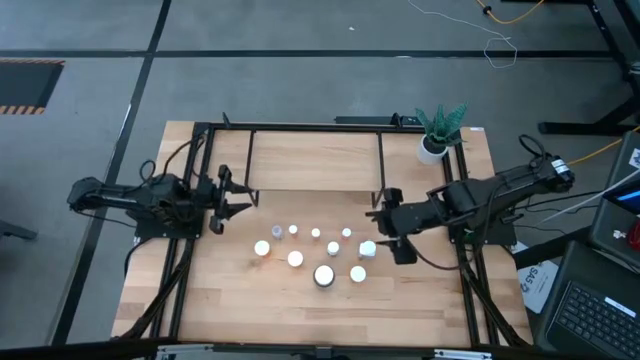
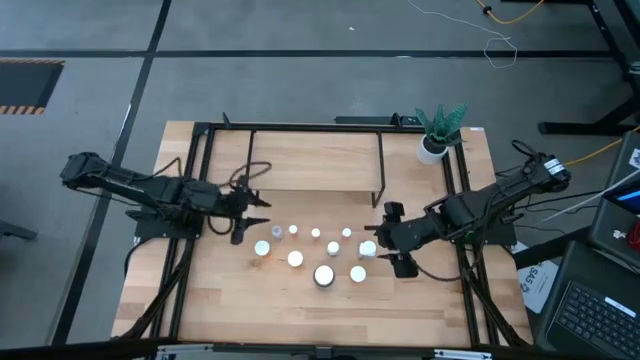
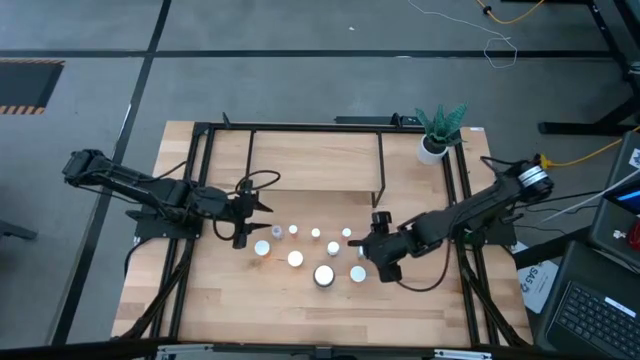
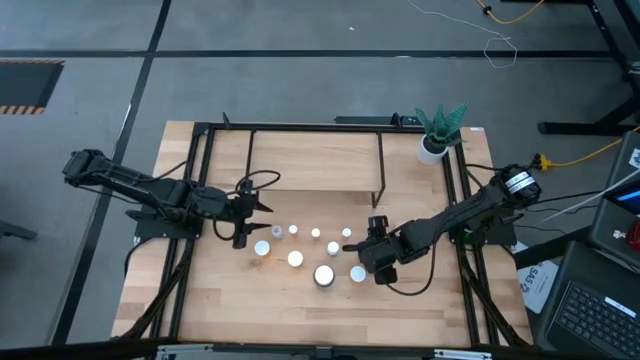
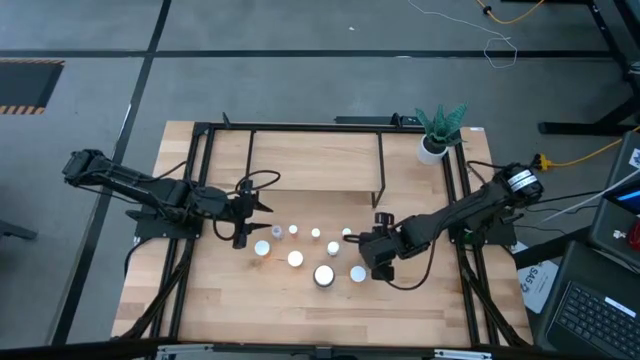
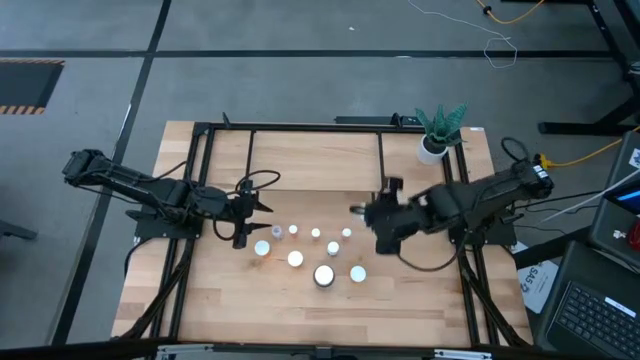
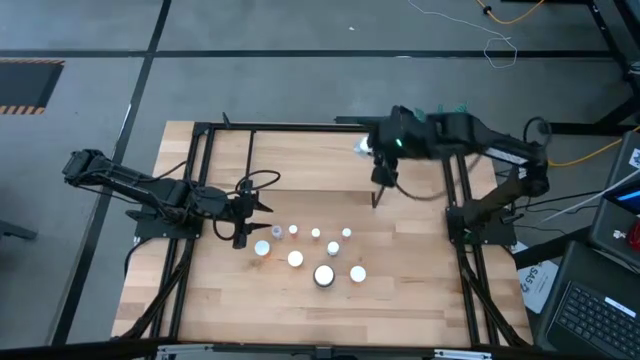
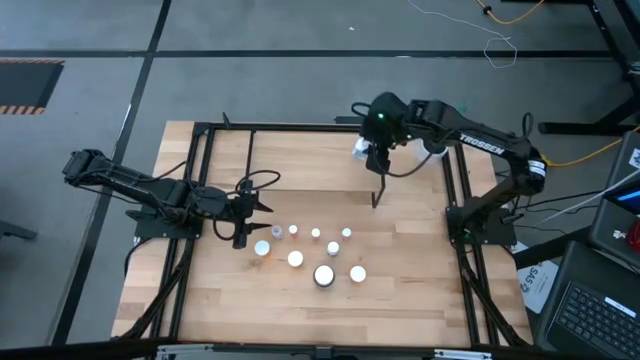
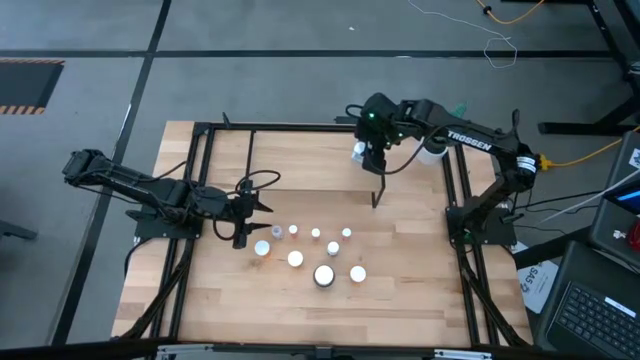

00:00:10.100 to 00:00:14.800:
Task: Pick and place medicine bottles onto shelf by color
Put the large white pill bottle on the shelf

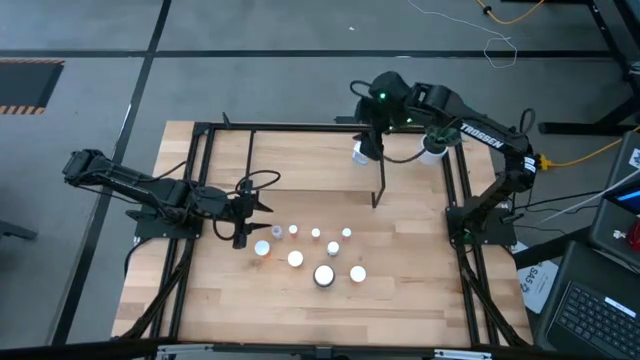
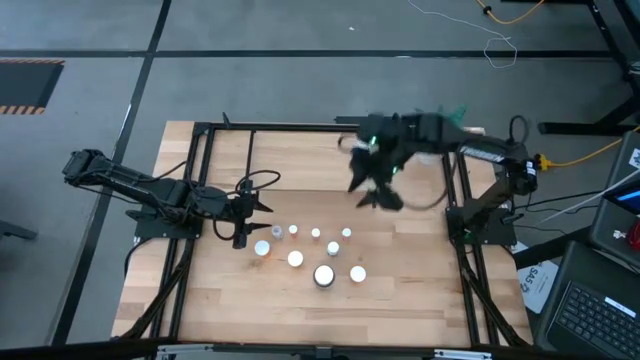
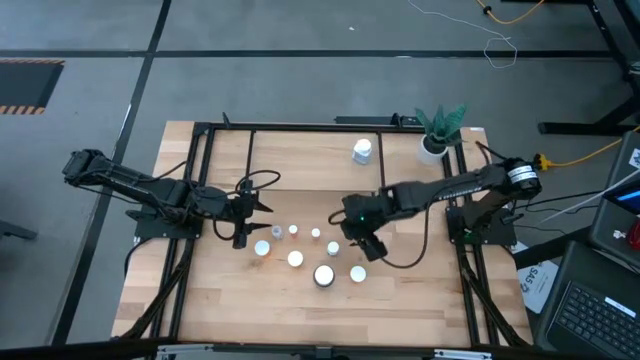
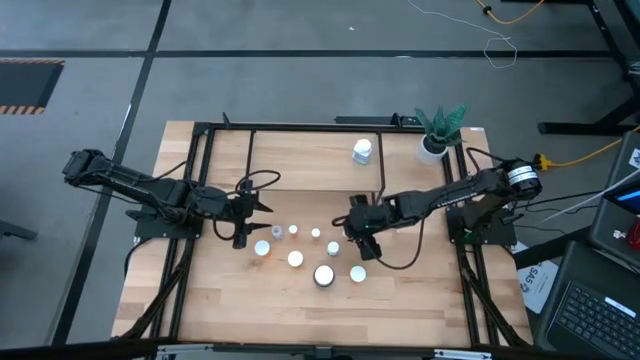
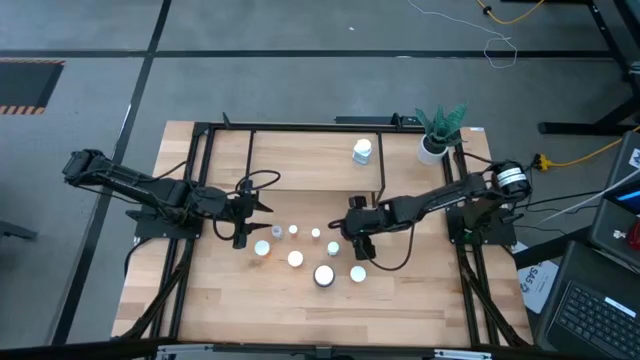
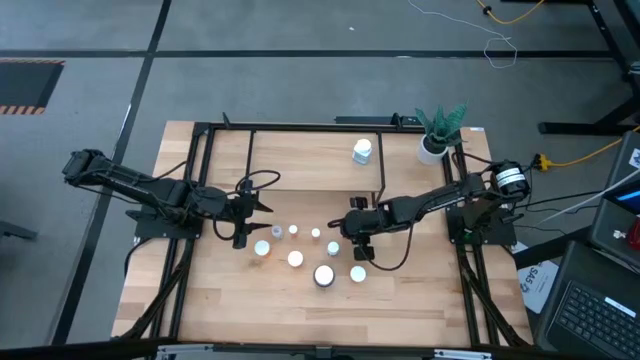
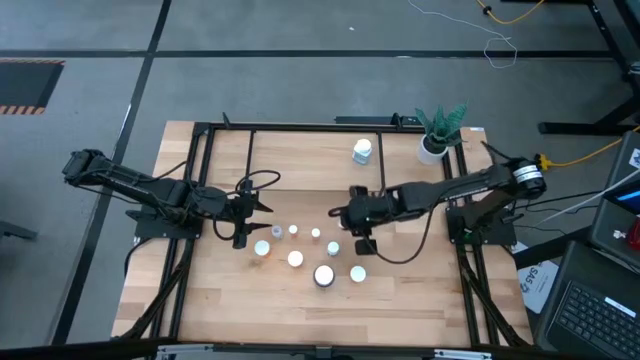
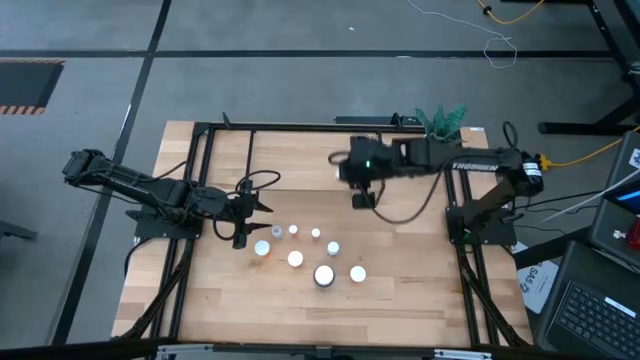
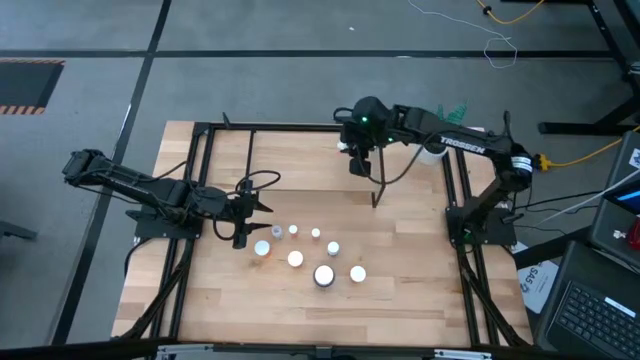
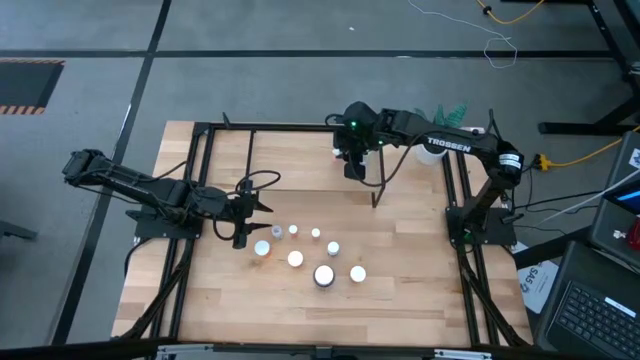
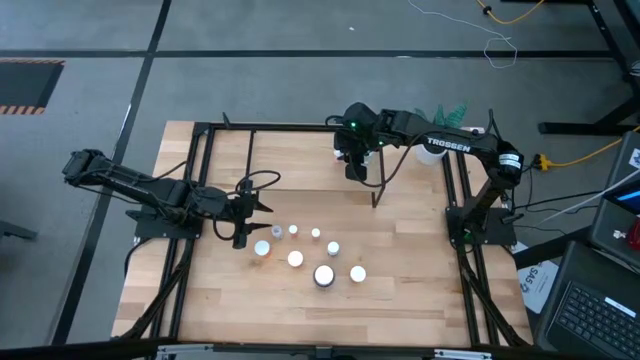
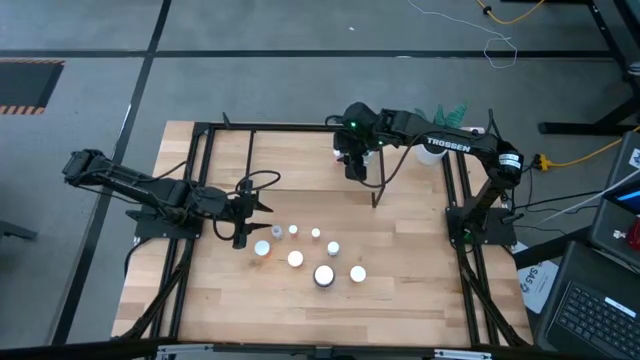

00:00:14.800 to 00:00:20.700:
Put the right pink pill bottle on the shelf

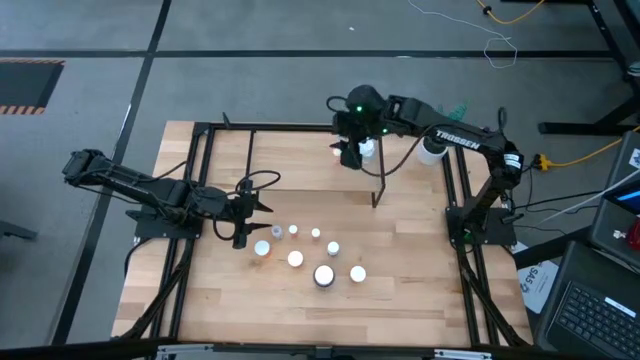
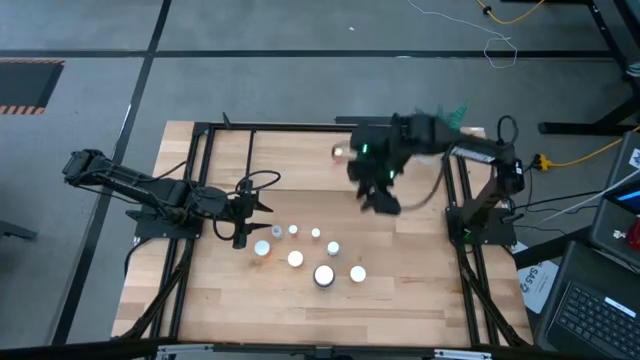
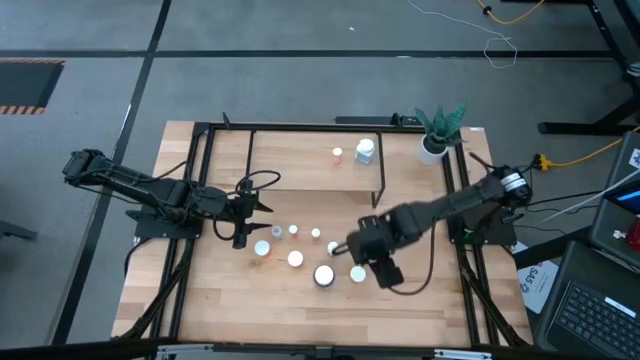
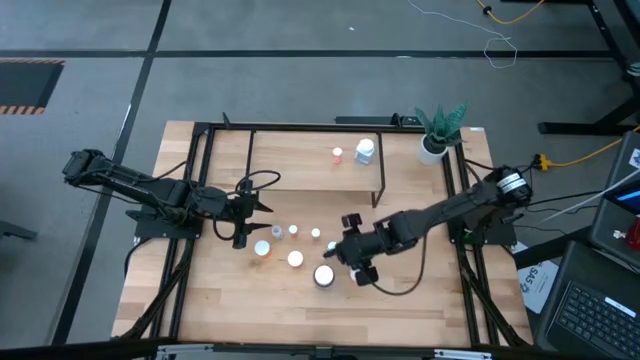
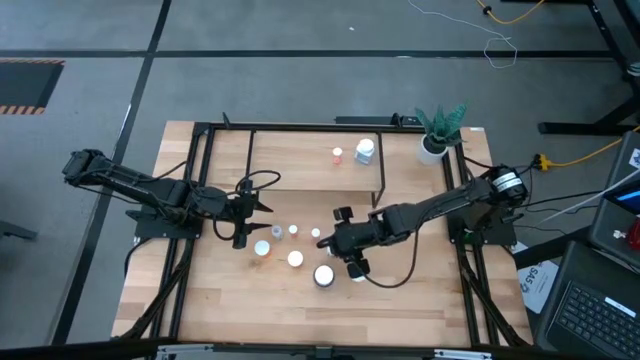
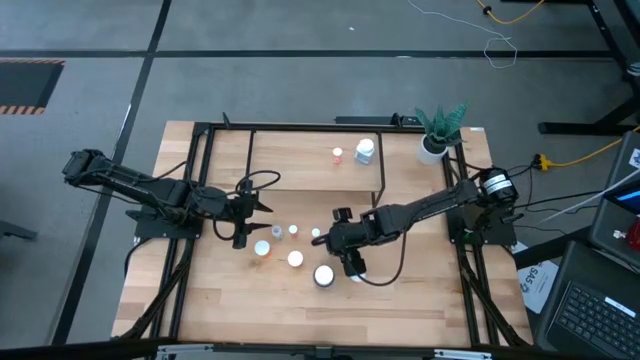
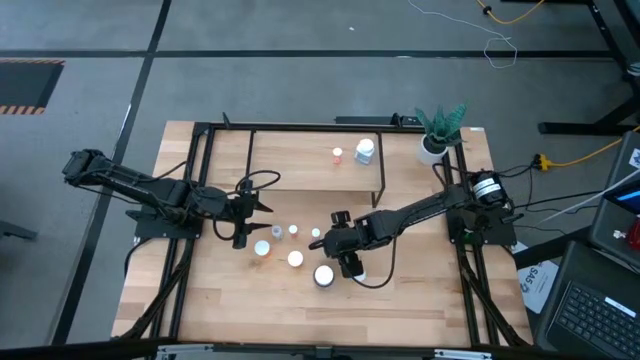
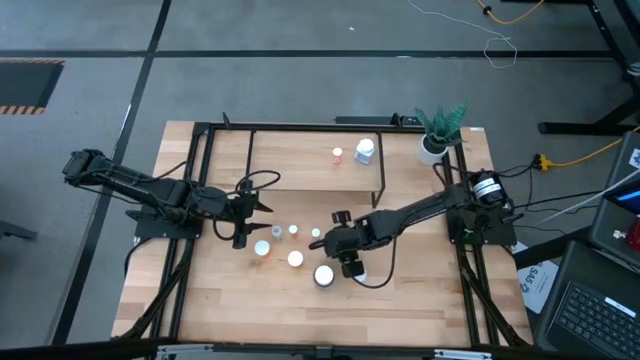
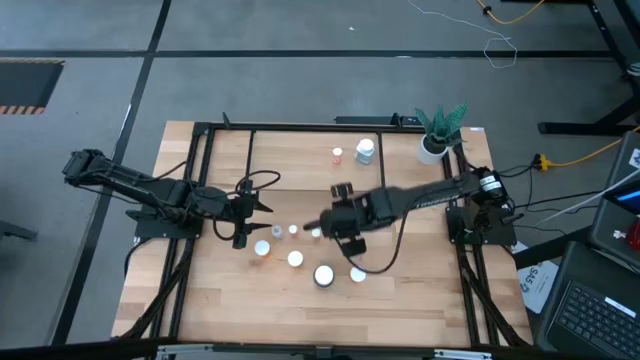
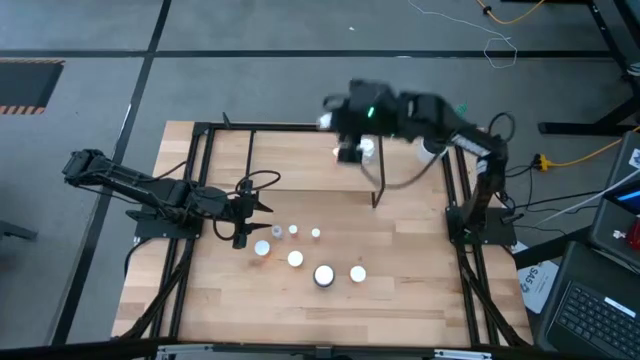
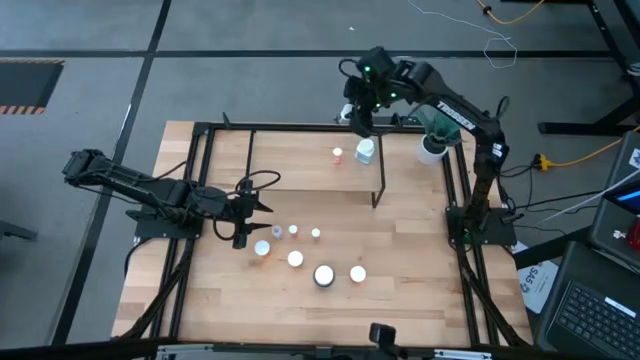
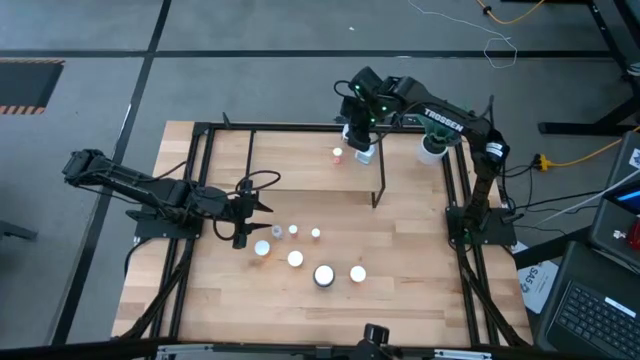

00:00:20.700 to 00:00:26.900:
Put the small white pill bottle on the shelf

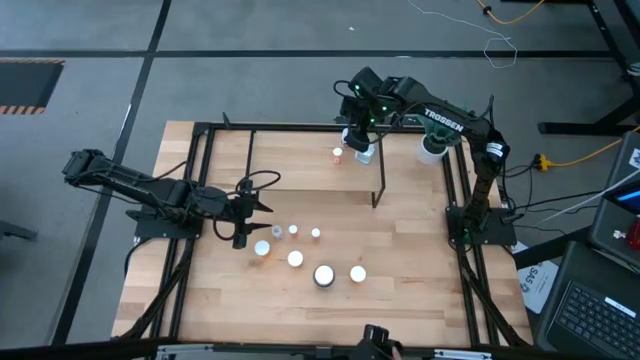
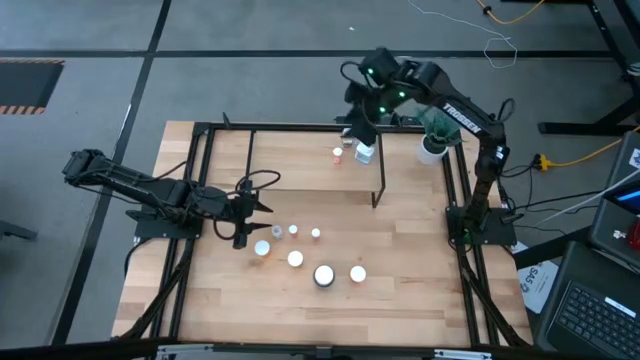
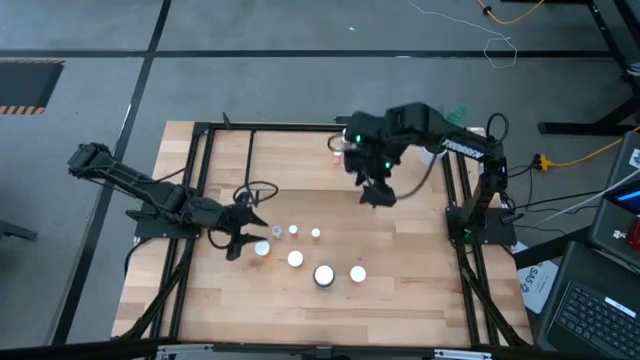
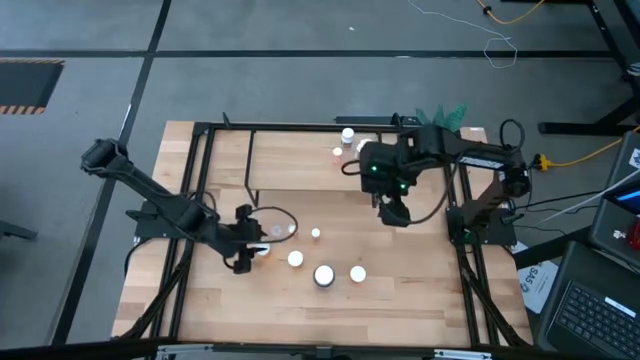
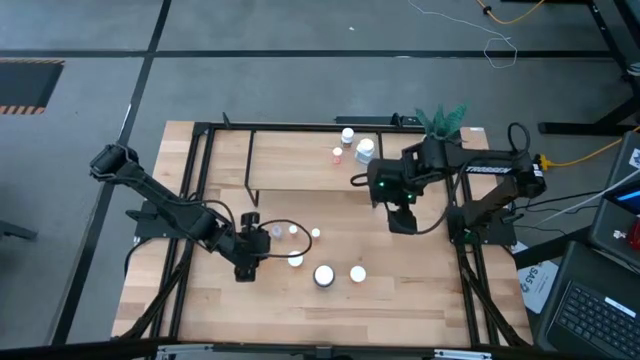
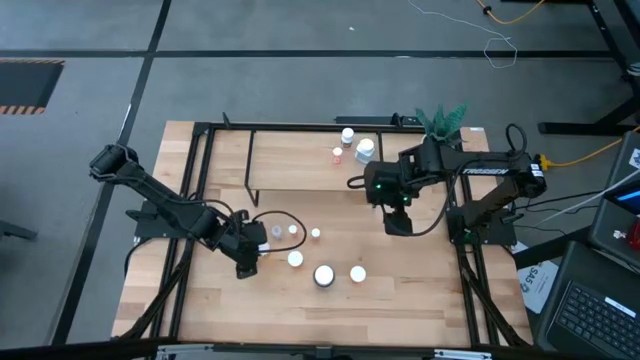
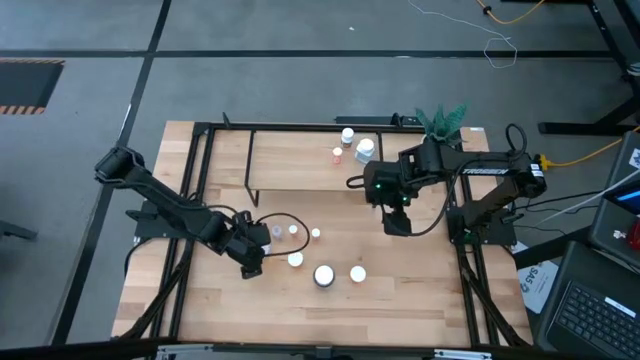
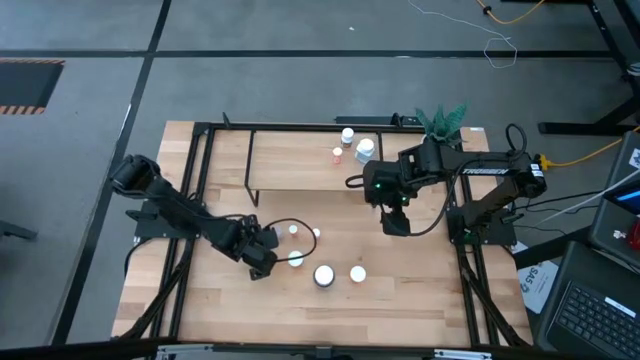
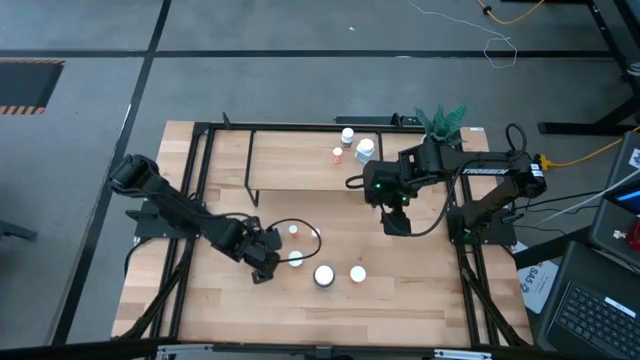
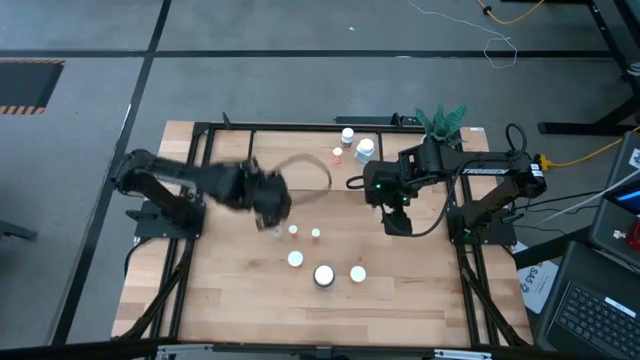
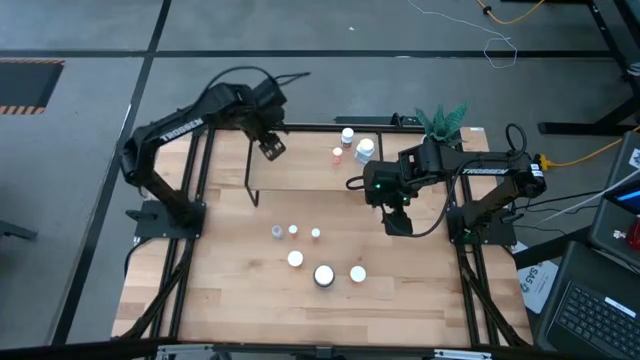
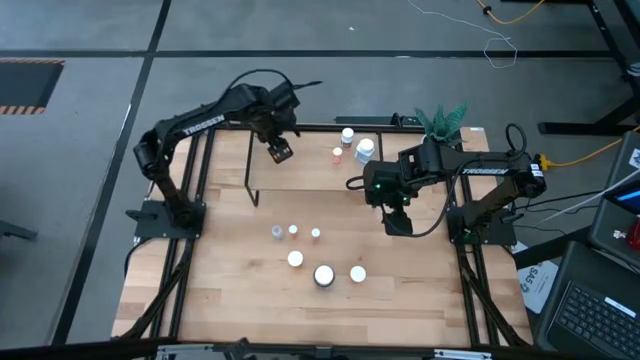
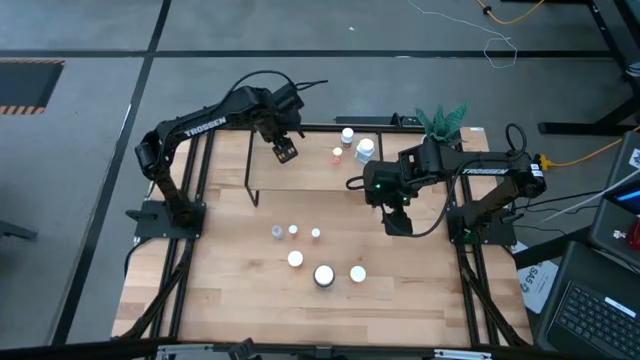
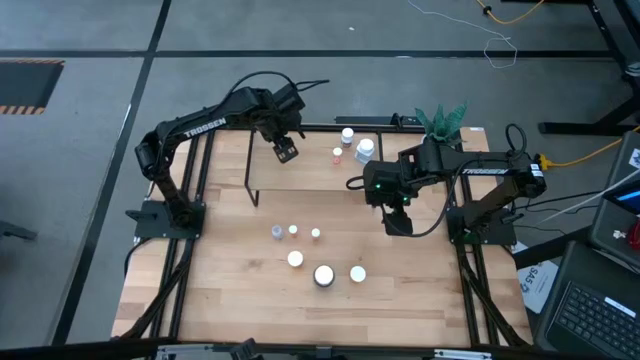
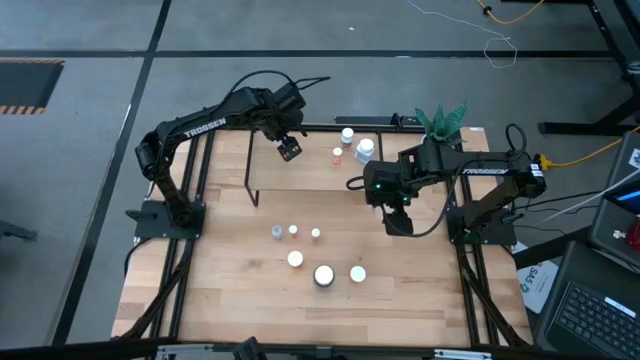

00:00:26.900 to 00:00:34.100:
Put the top left orange pill bottle on the shelf
